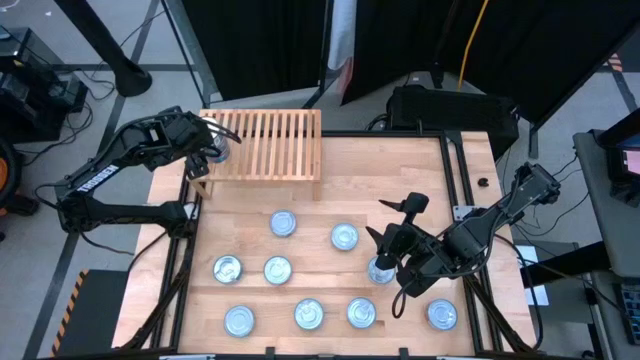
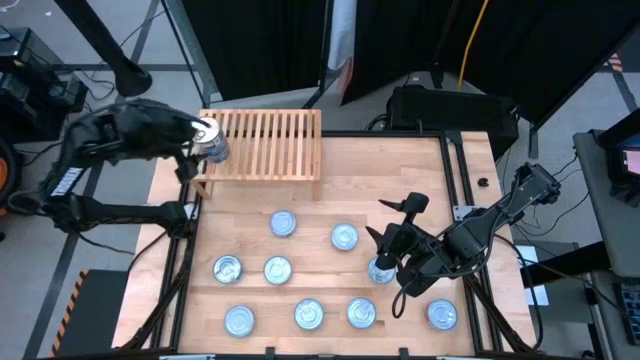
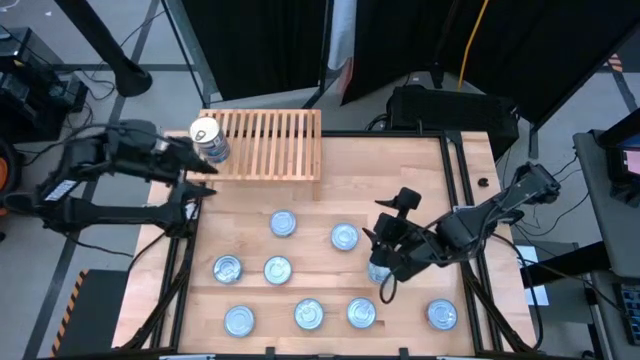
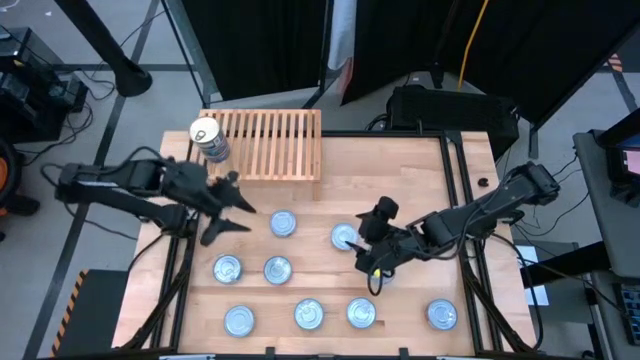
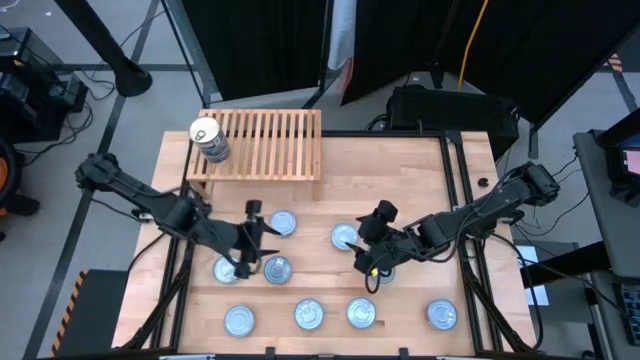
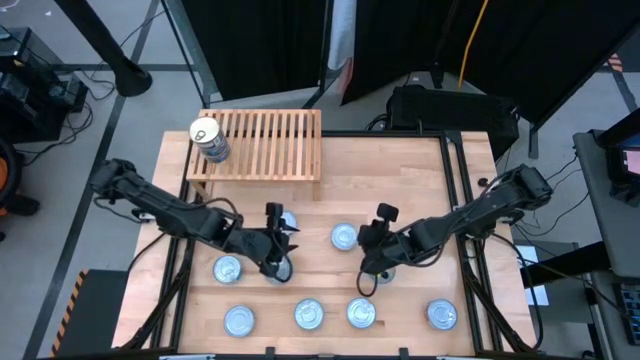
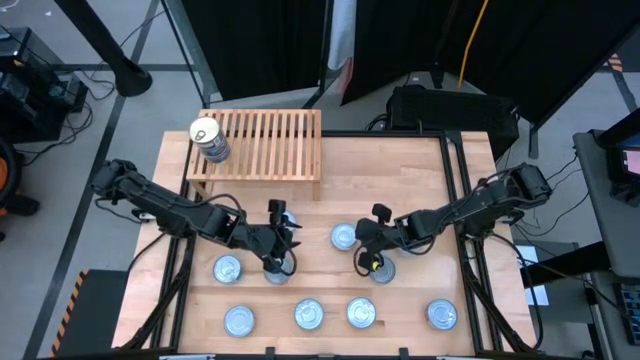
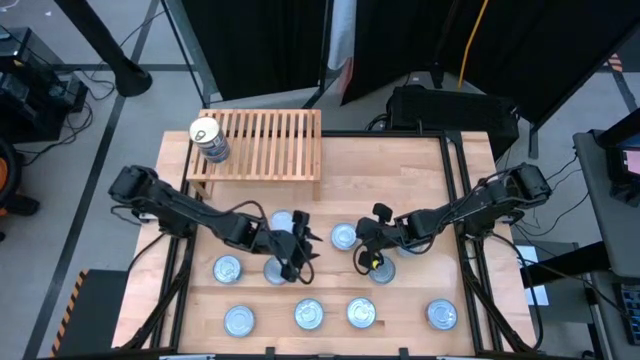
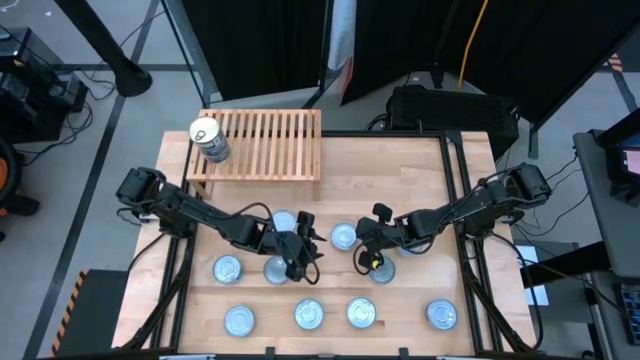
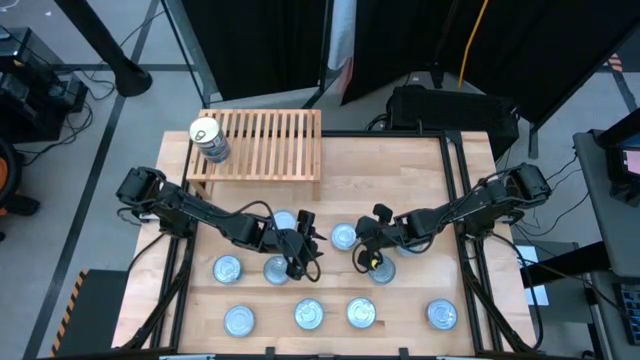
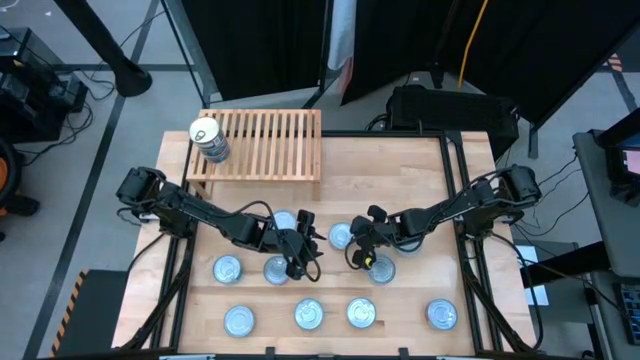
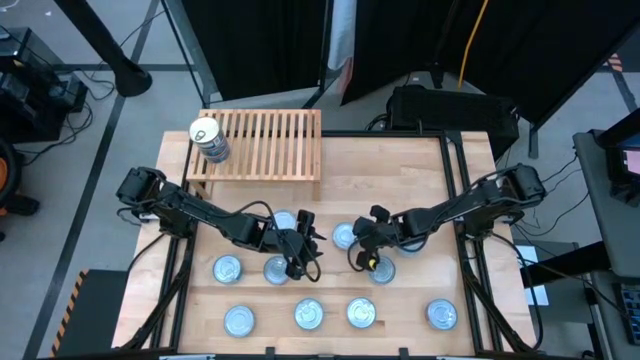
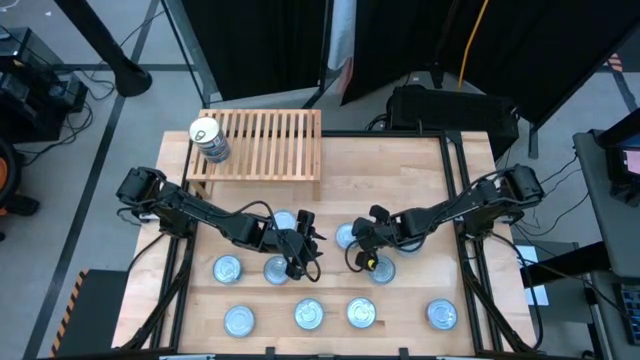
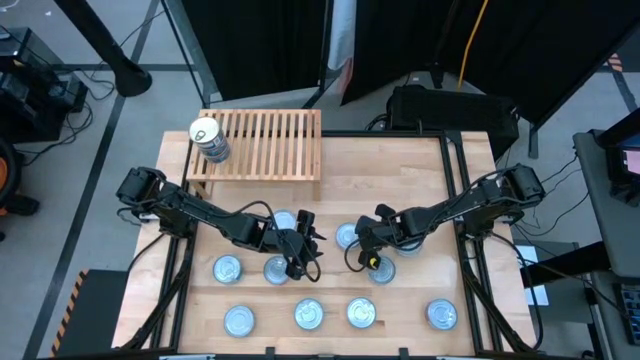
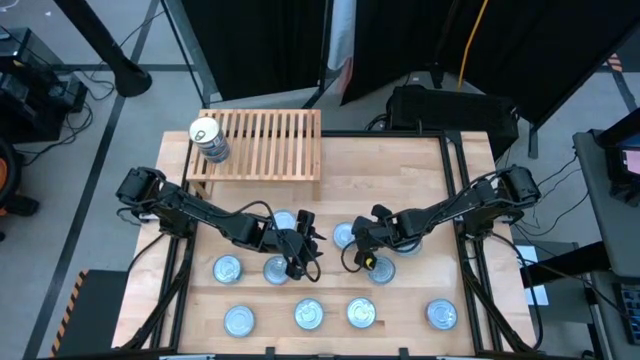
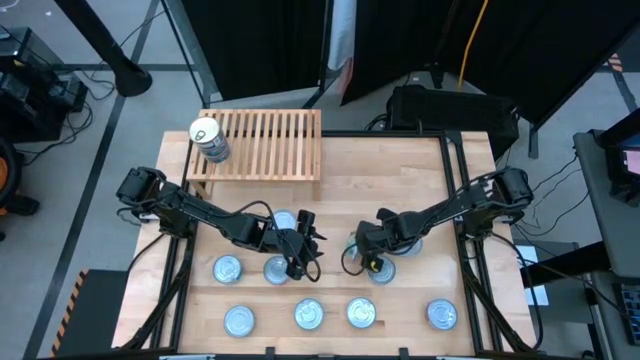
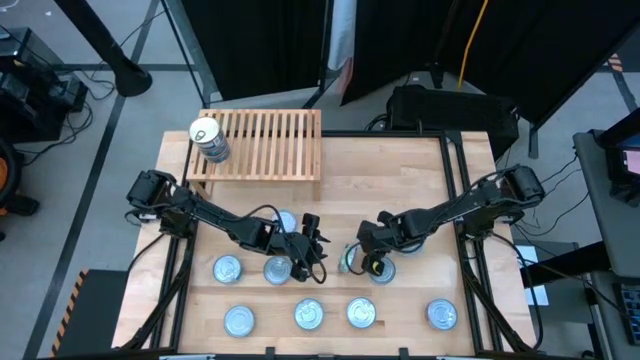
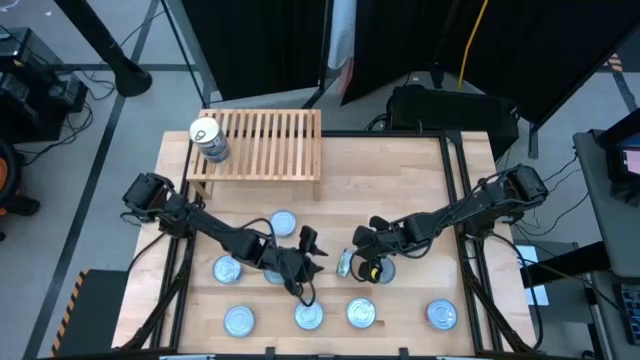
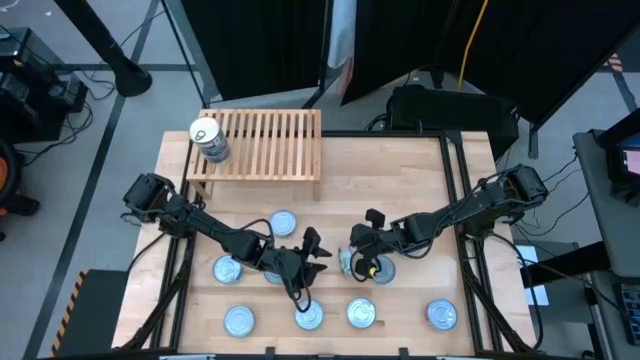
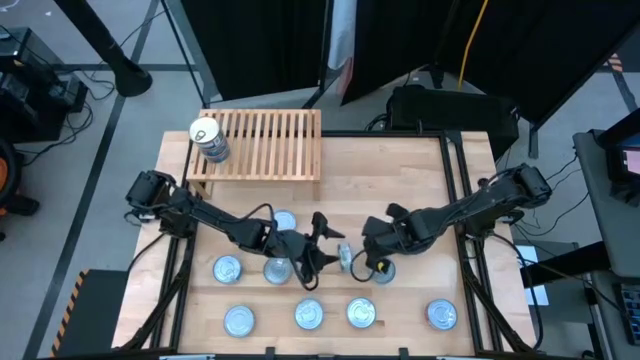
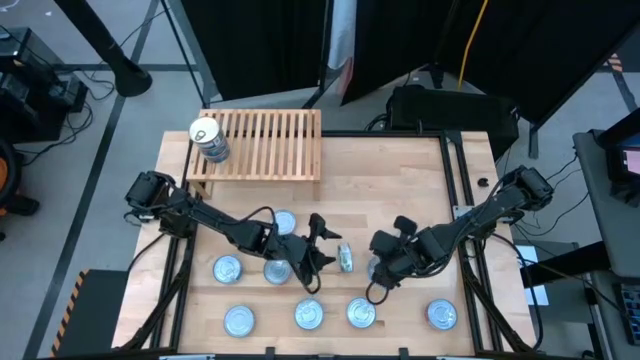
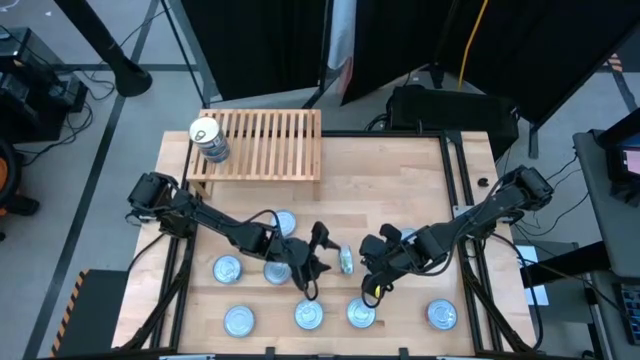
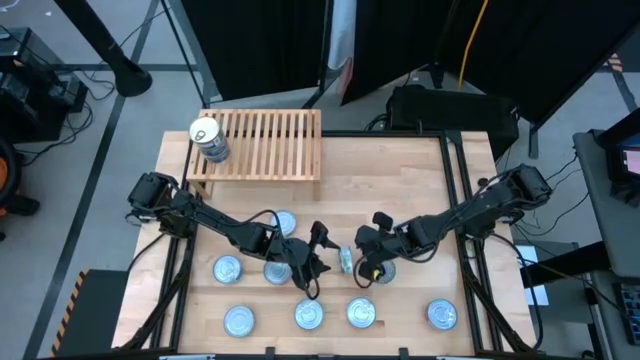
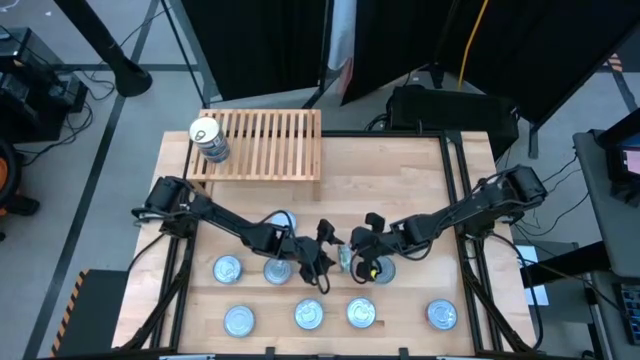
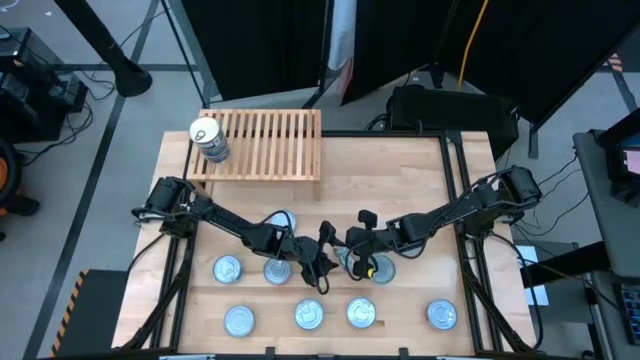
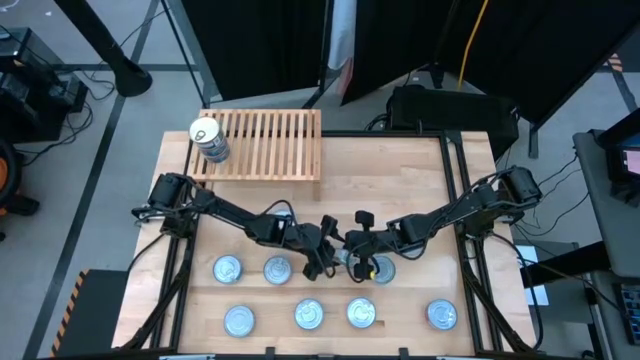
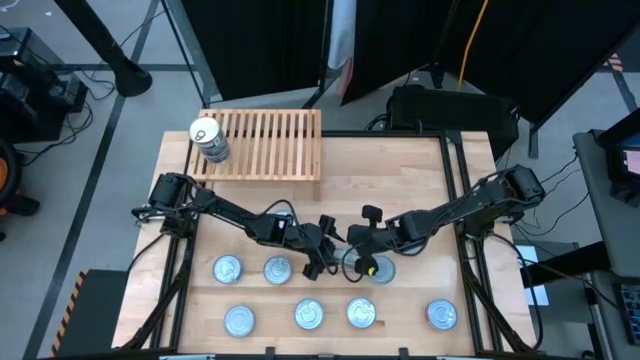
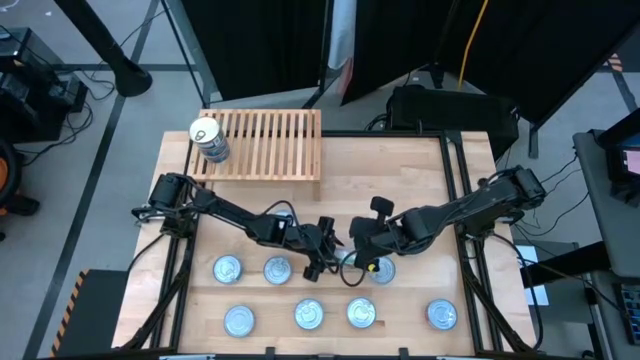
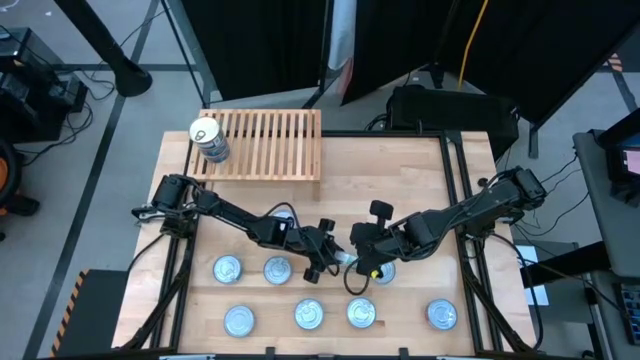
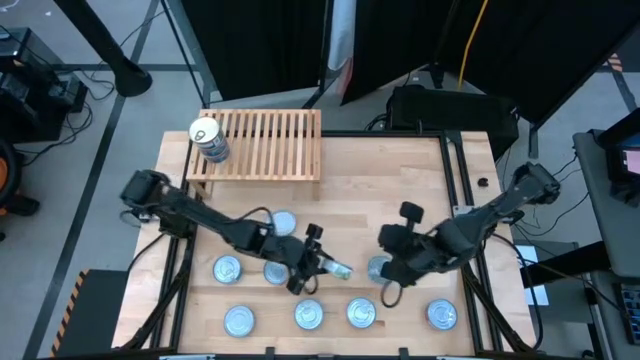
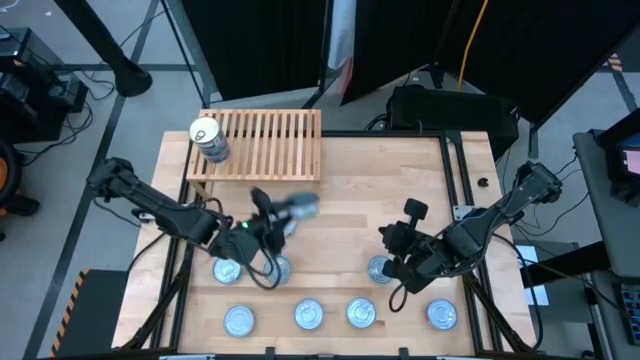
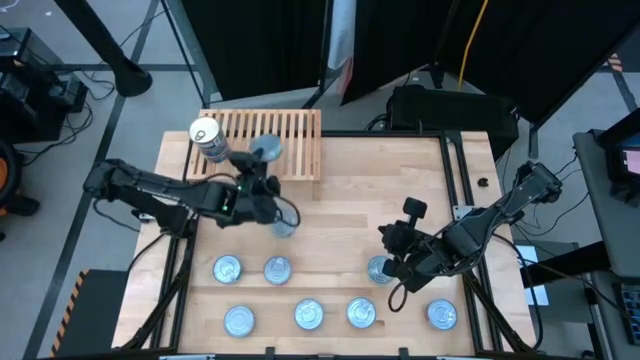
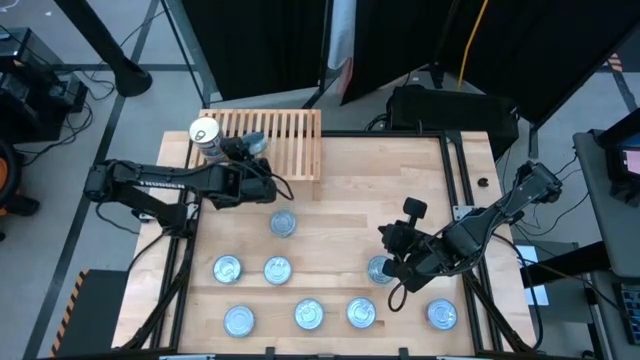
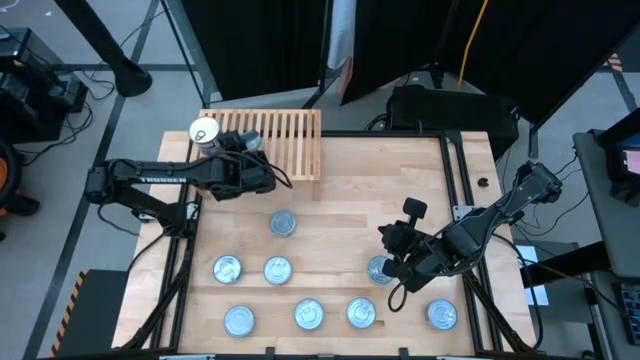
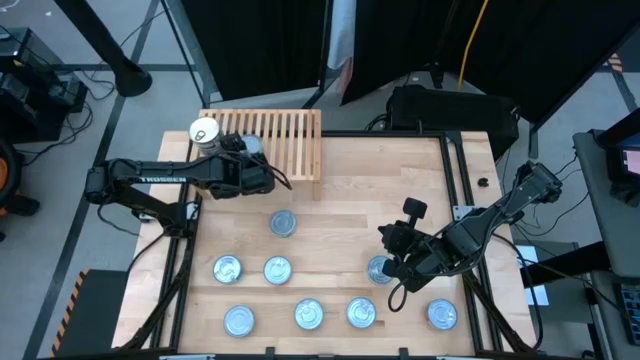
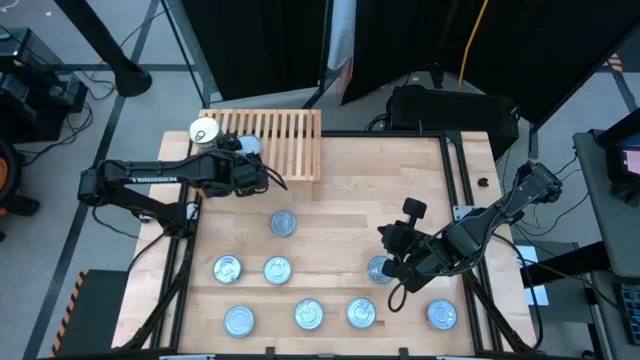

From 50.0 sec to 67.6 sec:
Task: Stack canned seafood by type on shelf
Put the center green can on the shelf

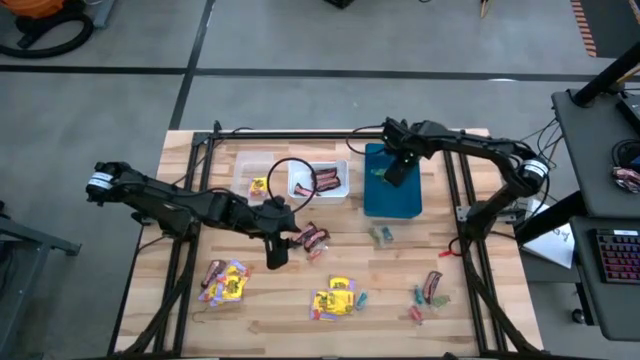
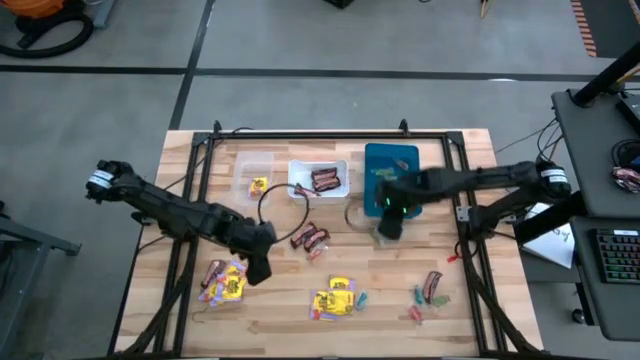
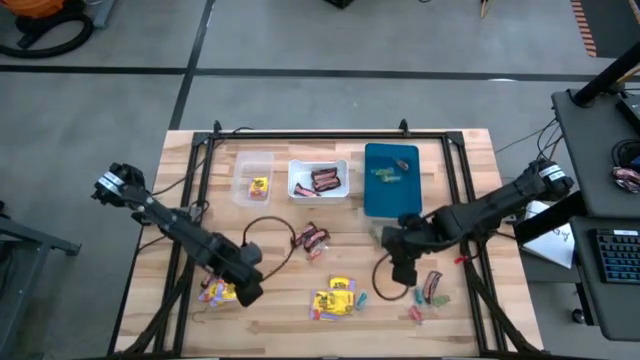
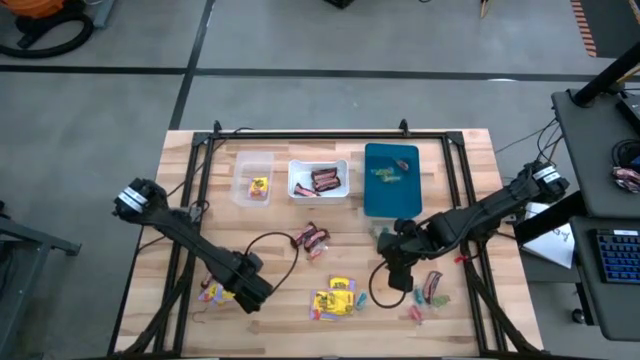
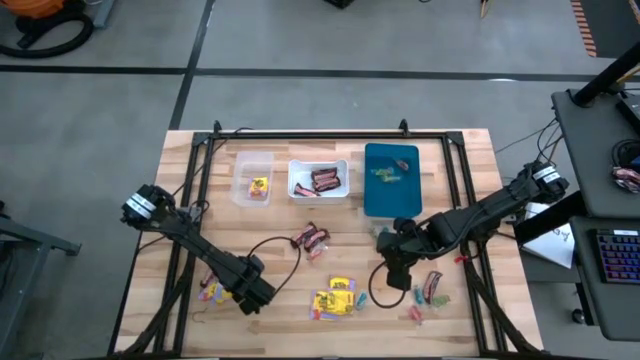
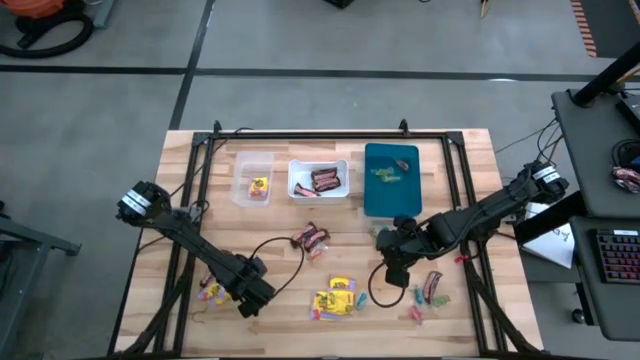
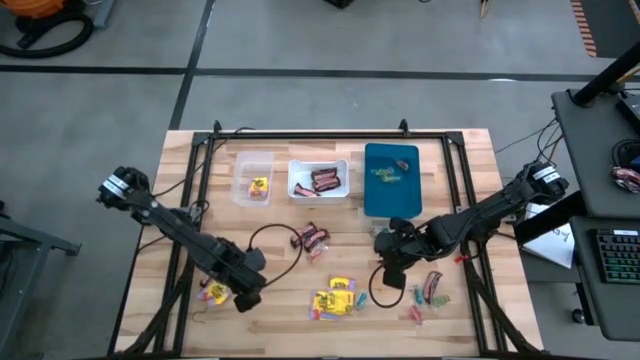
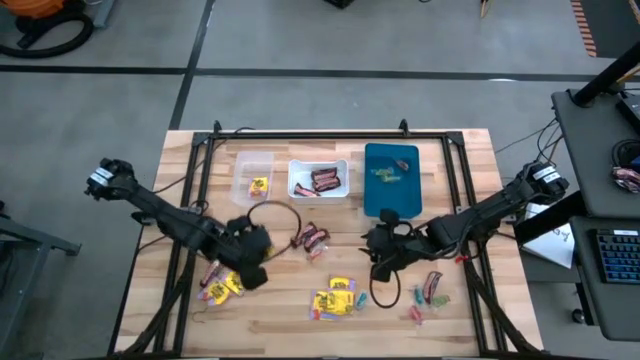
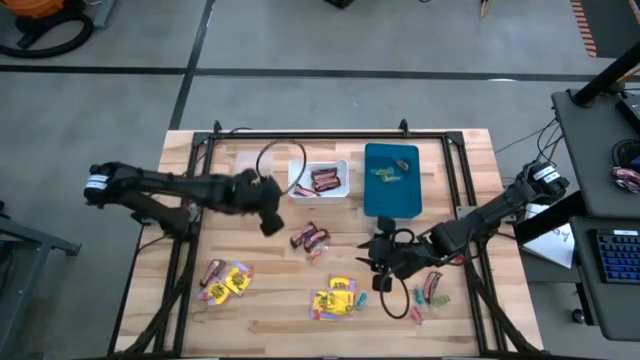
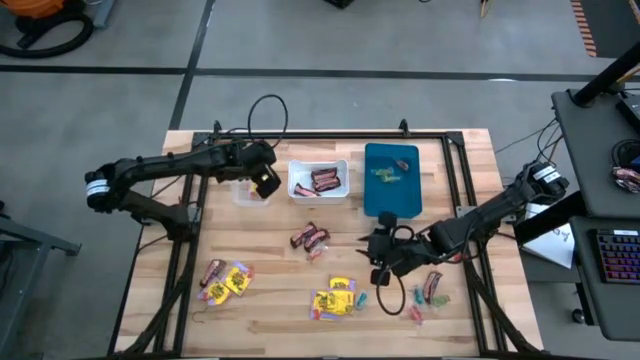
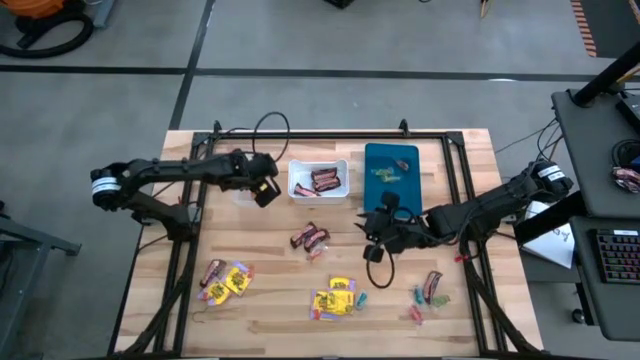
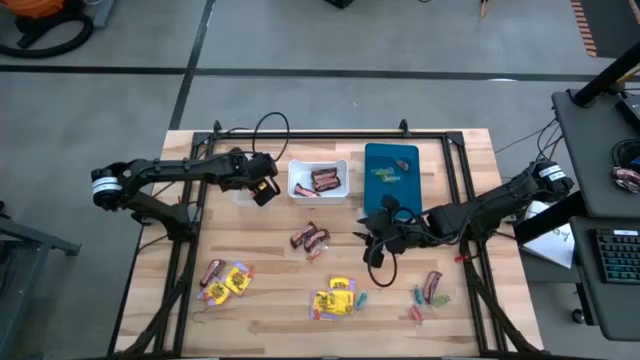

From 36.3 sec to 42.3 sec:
Task: Sort candy
Put the yellow candy into the transparent bin
